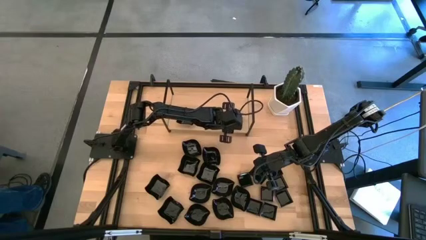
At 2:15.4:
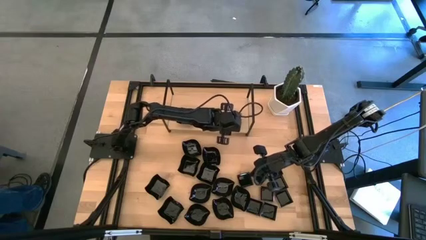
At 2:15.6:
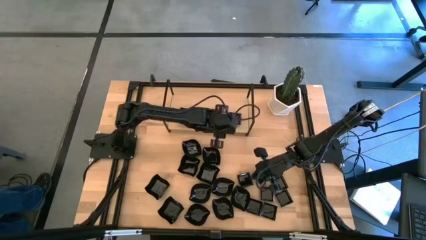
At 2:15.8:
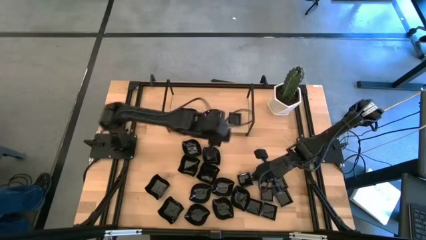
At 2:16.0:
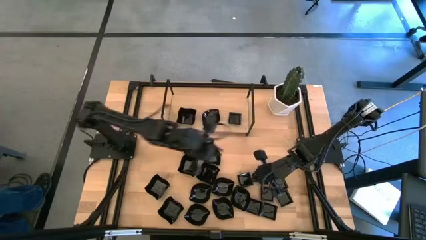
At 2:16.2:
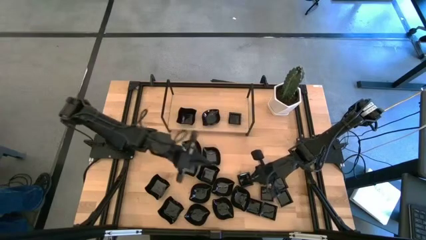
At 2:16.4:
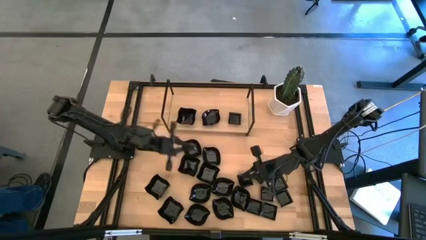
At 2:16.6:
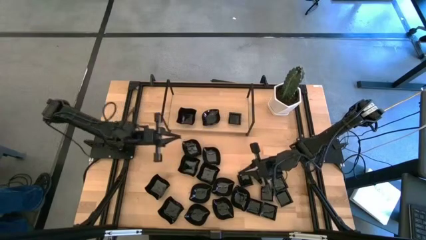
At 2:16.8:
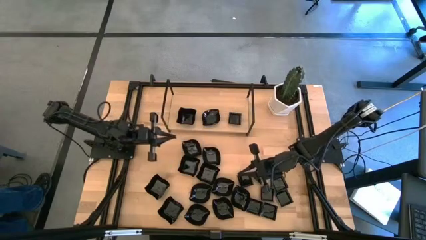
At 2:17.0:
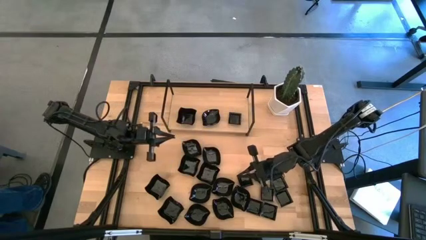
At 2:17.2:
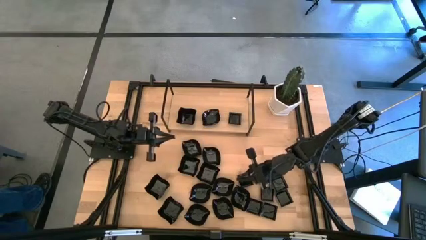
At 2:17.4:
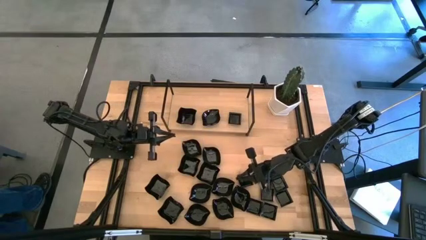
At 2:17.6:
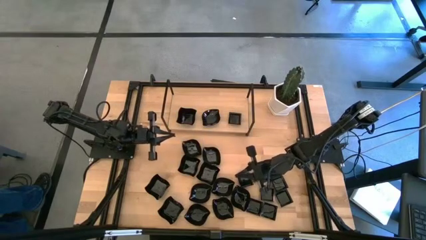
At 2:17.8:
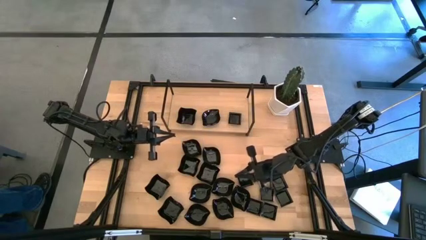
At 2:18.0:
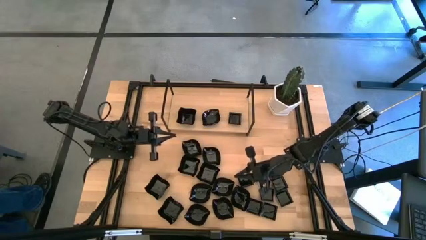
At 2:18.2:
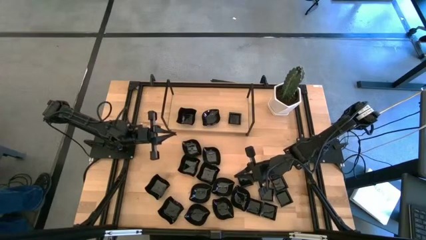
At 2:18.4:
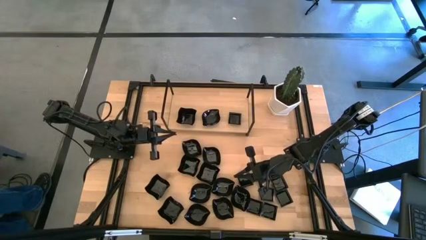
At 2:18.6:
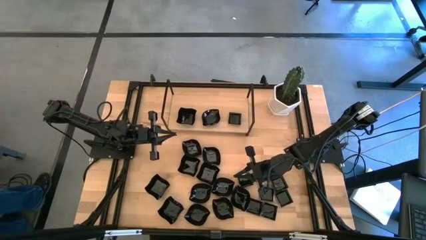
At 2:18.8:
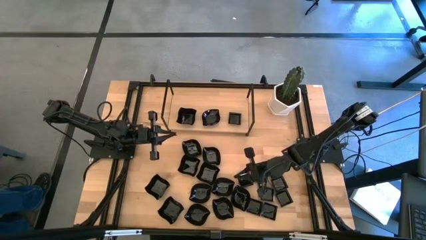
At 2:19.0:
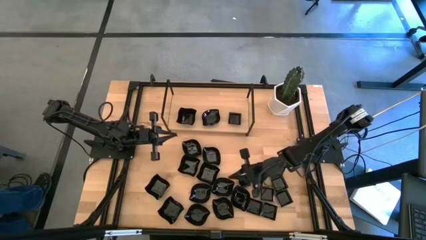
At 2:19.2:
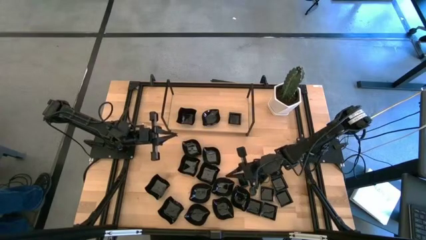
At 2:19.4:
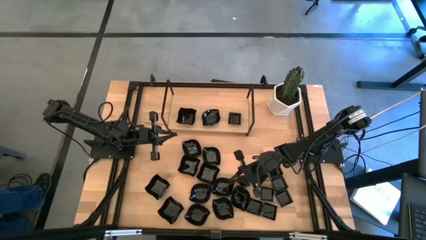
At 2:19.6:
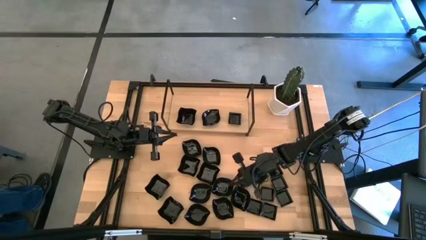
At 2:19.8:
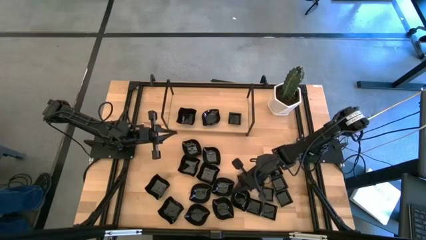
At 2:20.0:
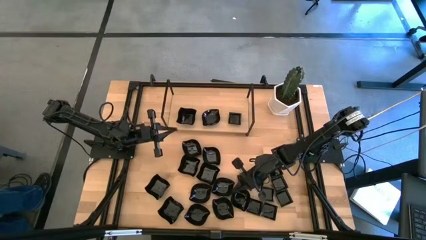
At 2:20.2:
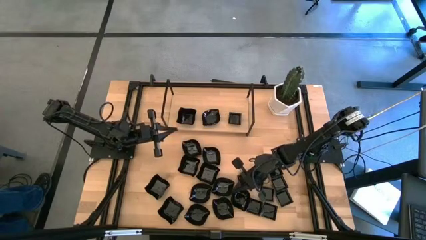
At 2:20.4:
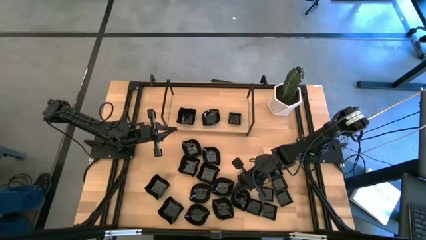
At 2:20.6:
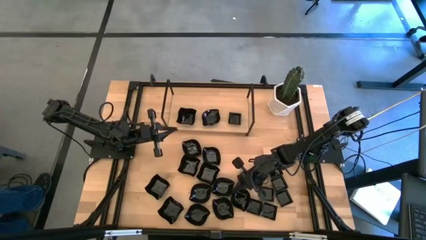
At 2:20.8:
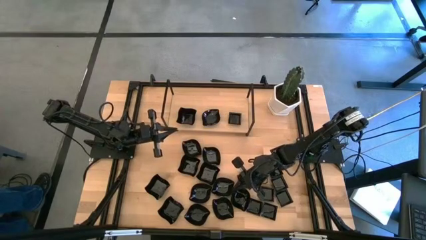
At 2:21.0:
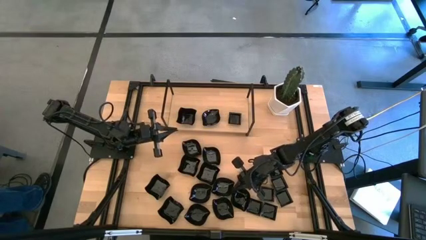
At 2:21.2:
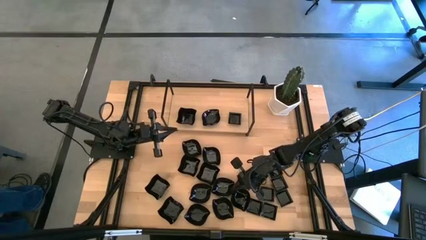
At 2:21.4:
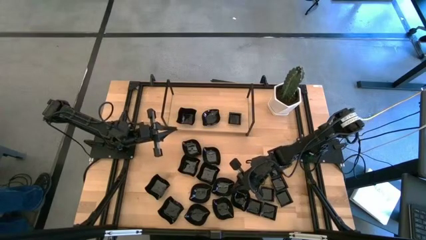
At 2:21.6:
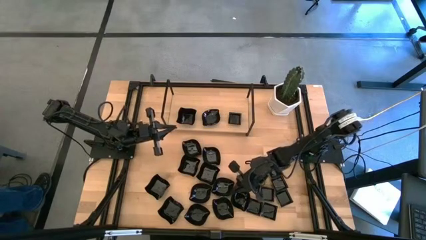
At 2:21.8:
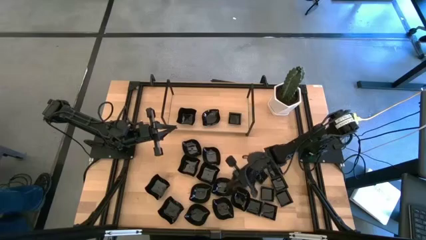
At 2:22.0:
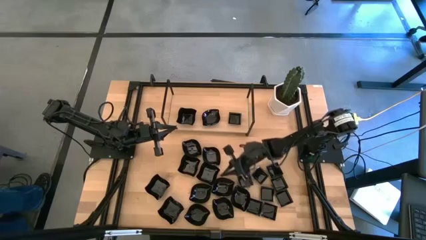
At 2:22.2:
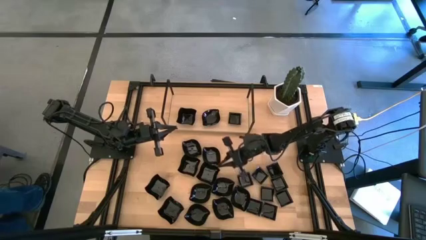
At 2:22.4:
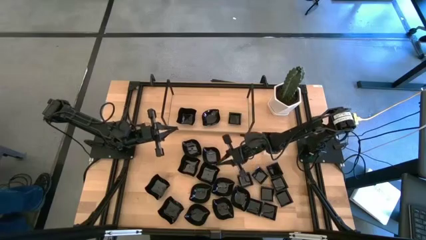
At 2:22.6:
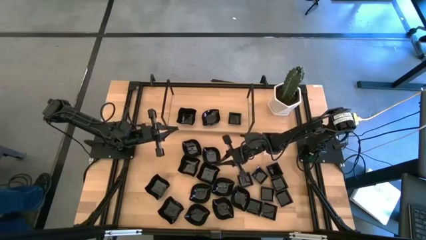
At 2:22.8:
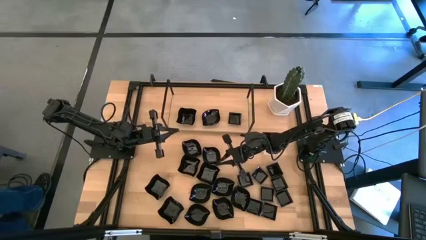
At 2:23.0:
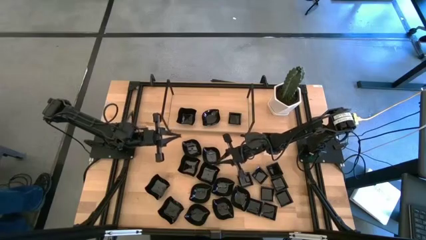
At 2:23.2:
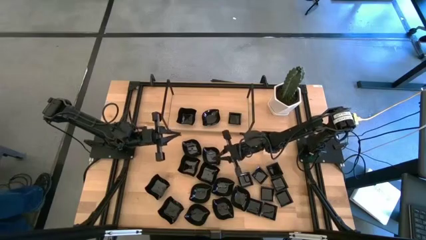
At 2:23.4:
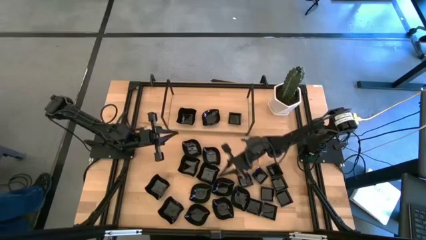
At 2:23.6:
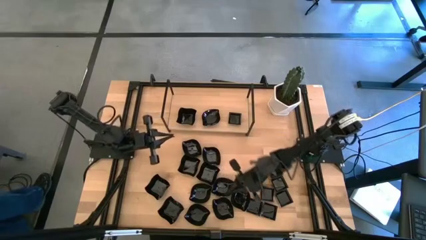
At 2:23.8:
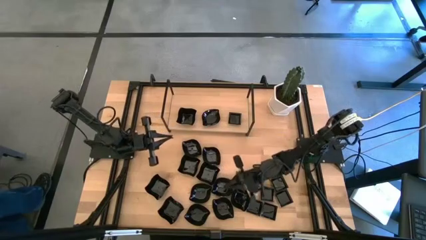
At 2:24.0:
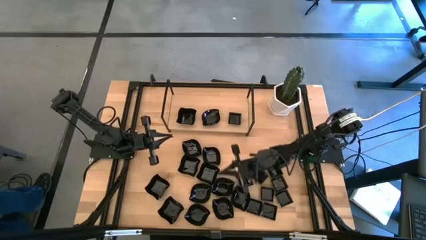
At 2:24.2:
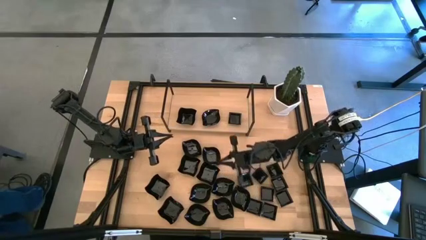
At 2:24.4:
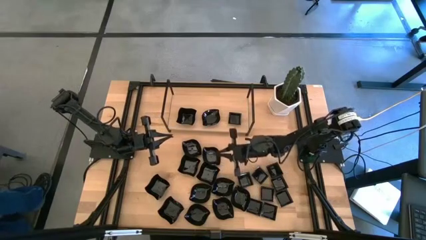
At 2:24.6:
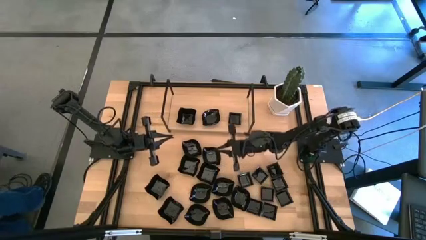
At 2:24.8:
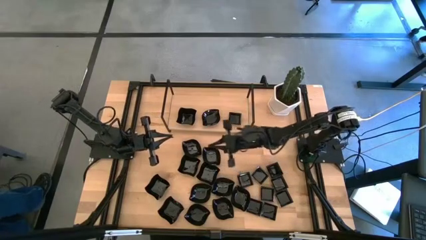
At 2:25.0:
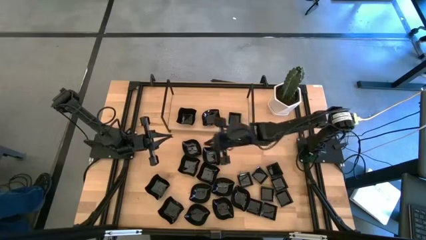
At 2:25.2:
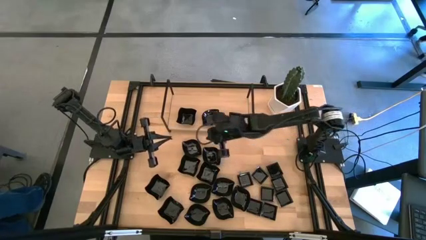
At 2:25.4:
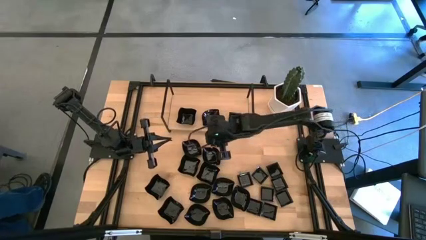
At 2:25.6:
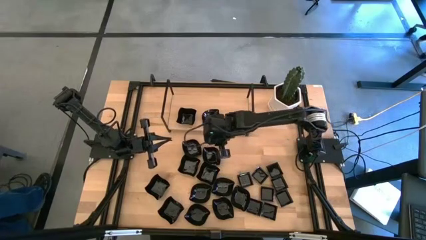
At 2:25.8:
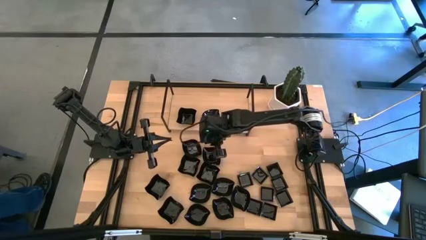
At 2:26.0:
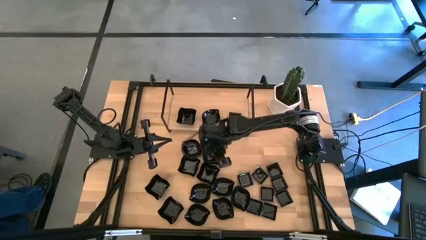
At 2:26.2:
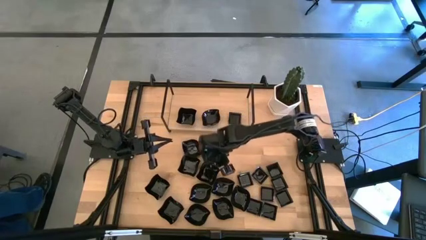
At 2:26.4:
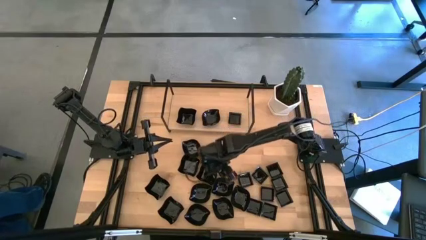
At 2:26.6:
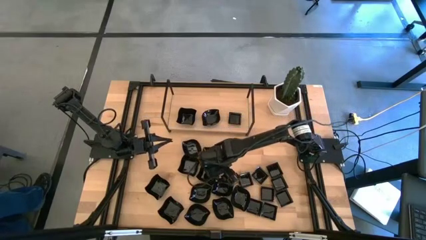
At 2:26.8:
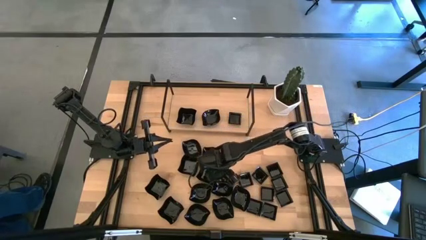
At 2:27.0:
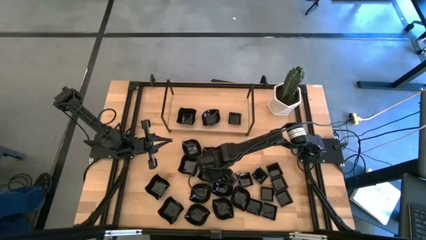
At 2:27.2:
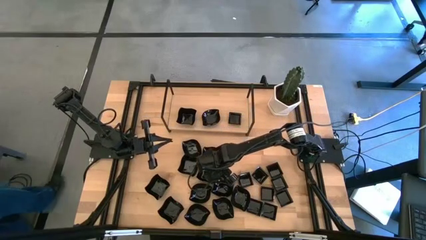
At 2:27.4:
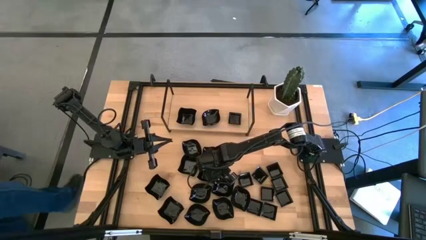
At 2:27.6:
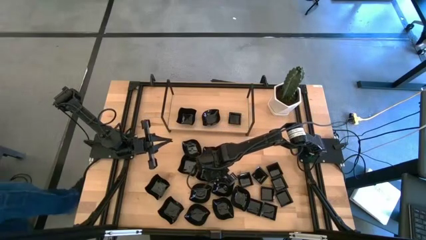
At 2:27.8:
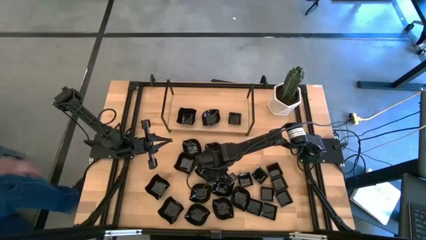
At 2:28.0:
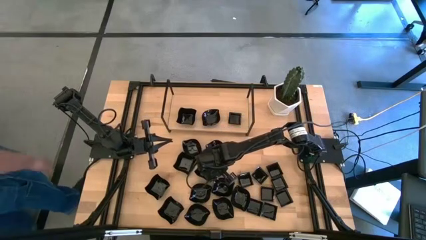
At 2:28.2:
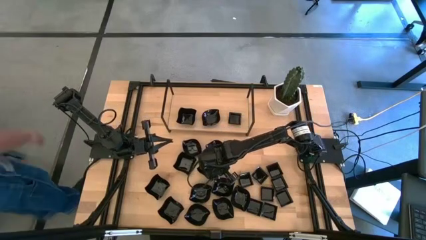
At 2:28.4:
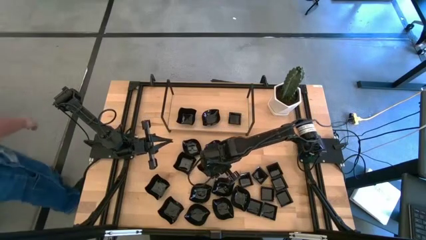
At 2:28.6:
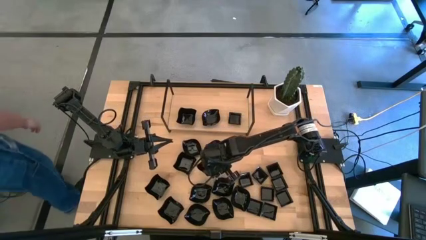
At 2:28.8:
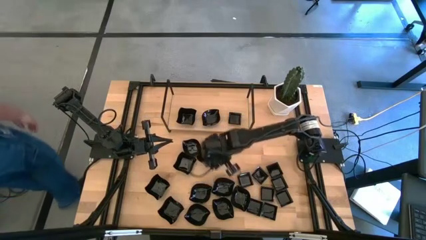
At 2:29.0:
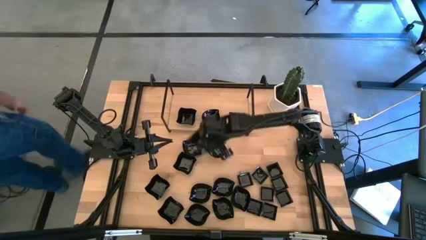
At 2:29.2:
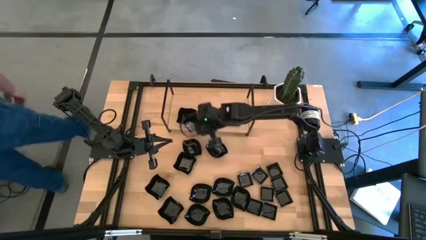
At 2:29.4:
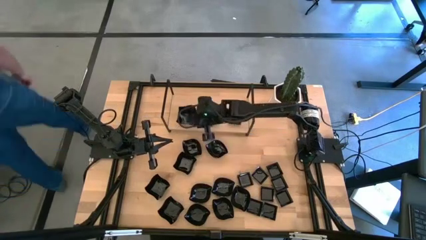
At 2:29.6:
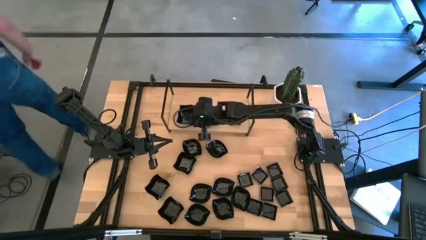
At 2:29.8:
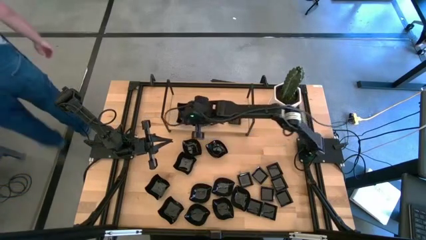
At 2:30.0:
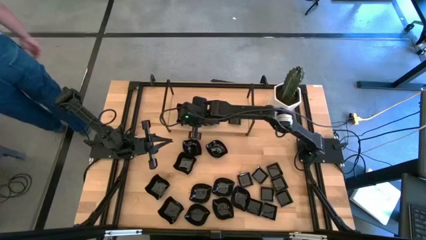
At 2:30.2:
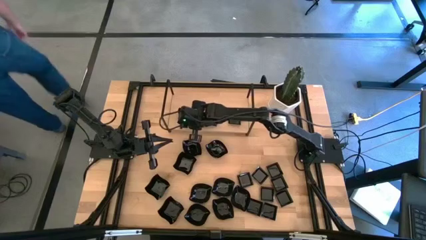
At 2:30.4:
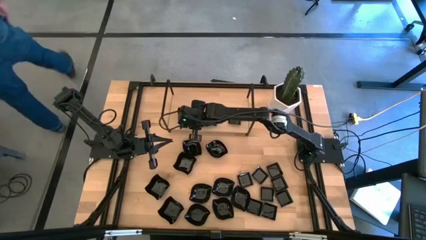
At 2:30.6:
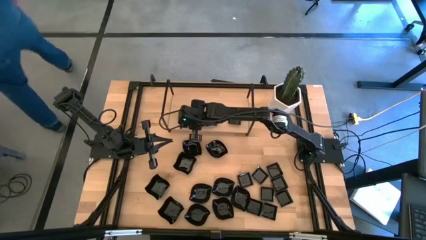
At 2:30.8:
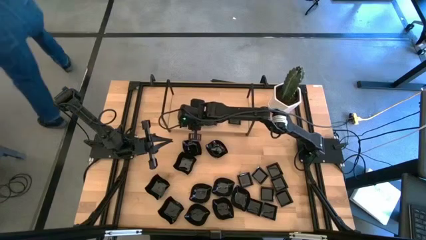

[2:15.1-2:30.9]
Task: Pick & Place Mini shaped plates
Stack the distorted square plate on the top of the distorted square plate on the shelf

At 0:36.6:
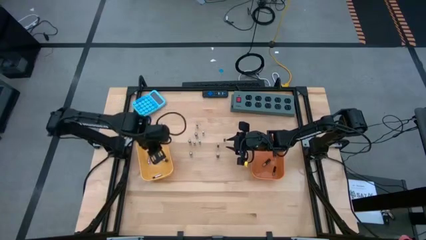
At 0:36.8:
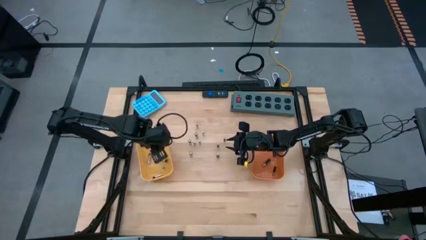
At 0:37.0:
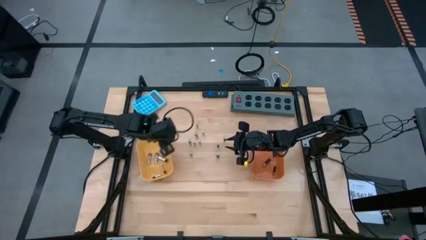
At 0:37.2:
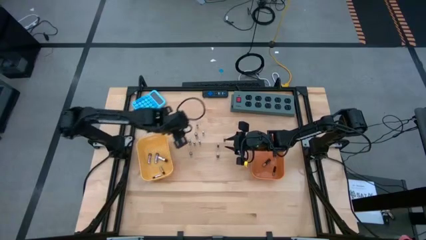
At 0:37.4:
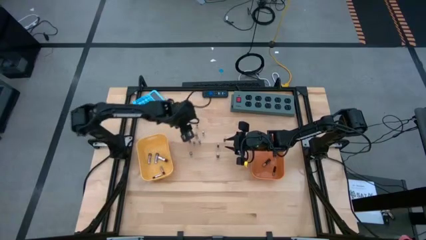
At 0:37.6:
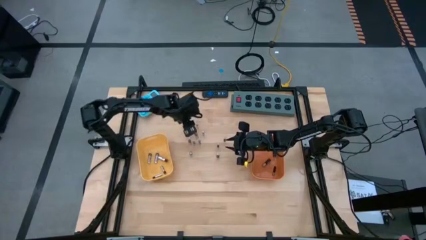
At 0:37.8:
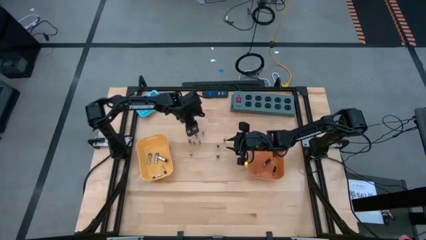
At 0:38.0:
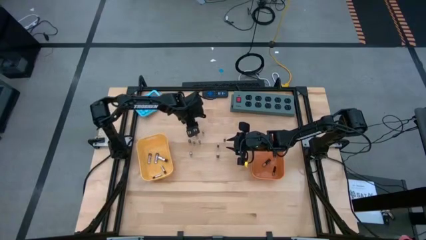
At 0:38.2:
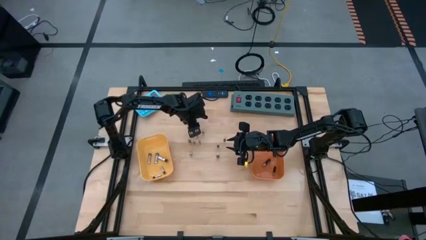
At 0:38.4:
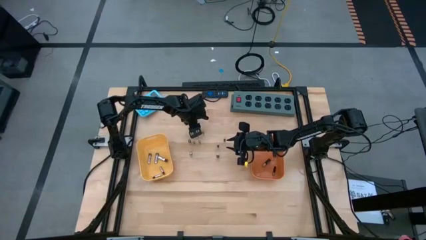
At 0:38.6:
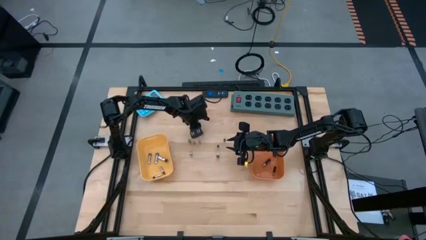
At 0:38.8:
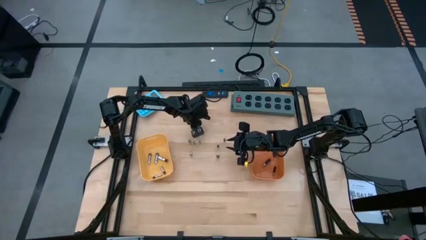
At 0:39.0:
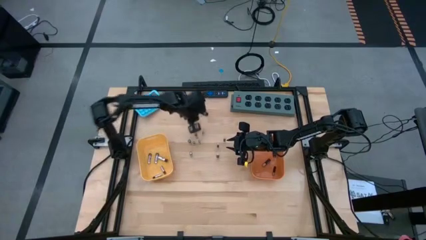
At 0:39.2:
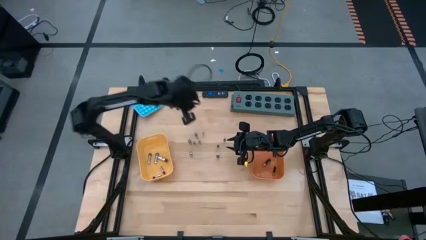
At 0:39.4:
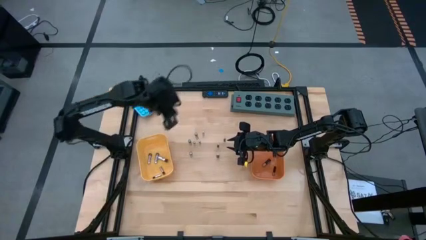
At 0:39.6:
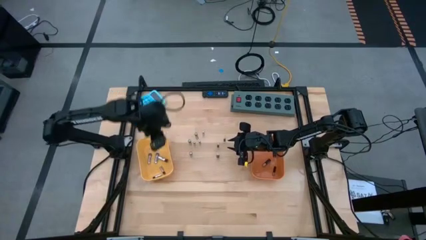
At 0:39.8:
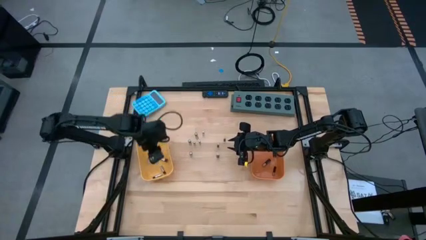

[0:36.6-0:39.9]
Task: Sort batteries
Put the silver battery into the yellow bin
